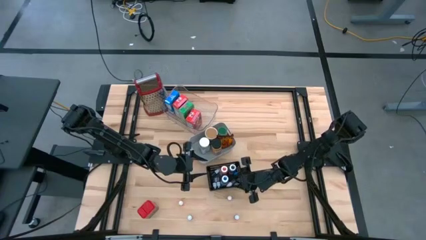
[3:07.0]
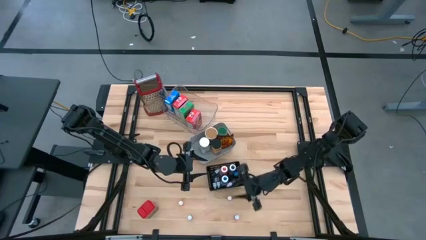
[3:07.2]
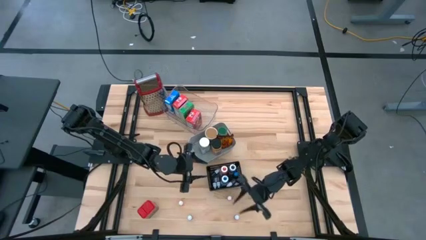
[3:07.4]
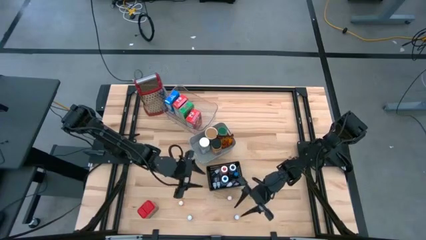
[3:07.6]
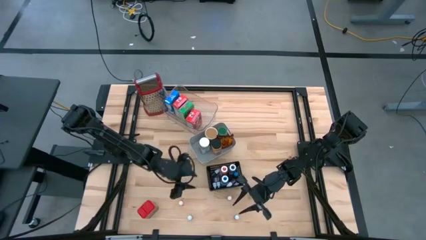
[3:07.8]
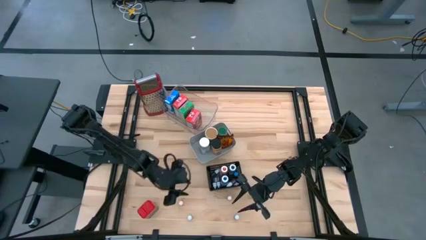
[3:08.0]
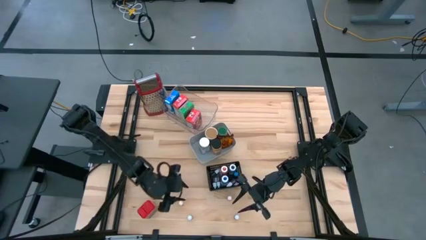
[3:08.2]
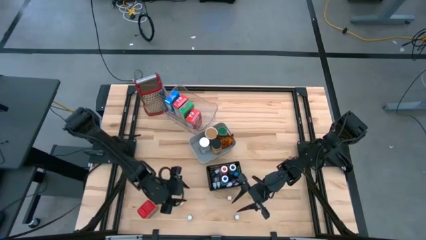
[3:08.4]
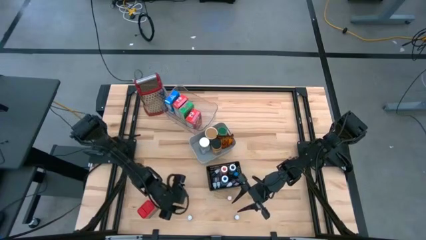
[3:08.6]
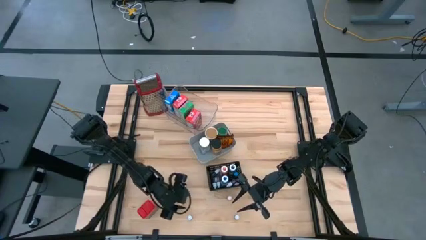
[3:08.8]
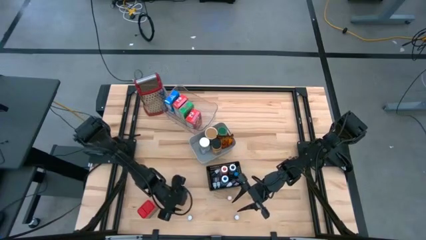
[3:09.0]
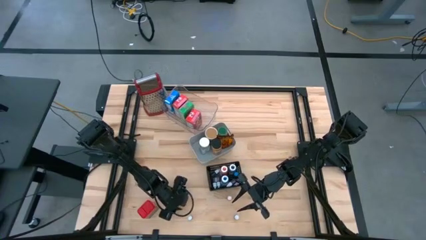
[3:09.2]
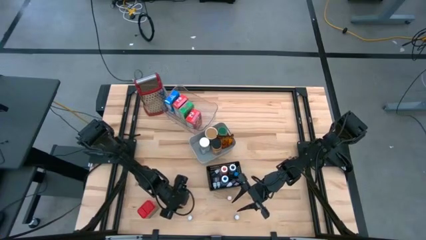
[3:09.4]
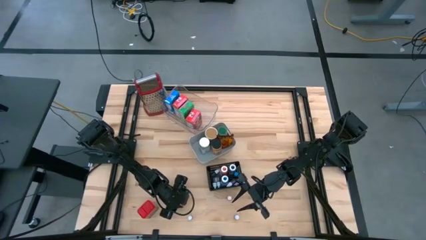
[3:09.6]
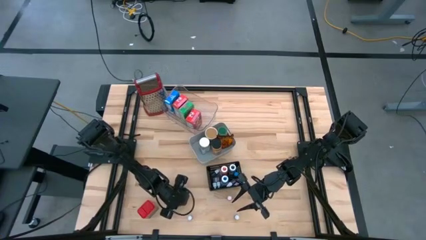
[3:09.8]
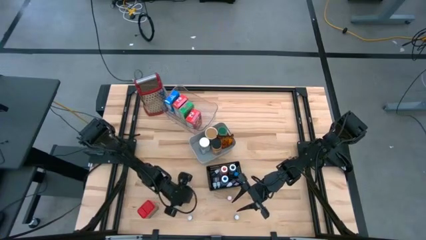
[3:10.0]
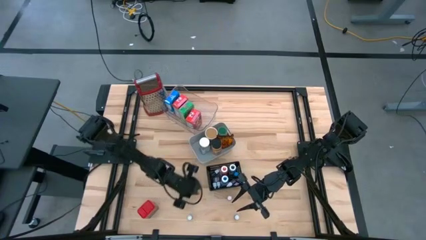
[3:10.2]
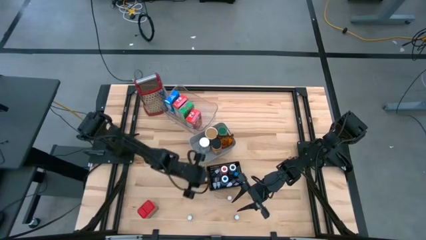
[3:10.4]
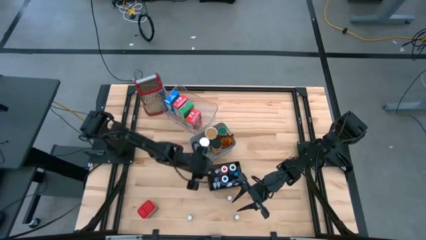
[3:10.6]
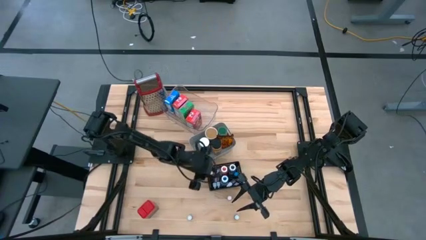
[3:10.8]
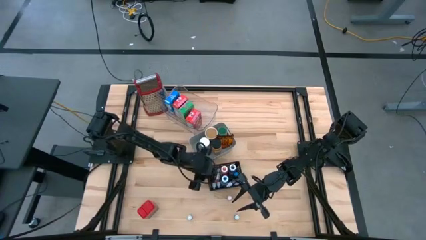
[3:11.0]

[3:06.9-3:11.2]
Task: Pick & Place Kitchen Items
Put the orange small food coloring bottle into the black bin

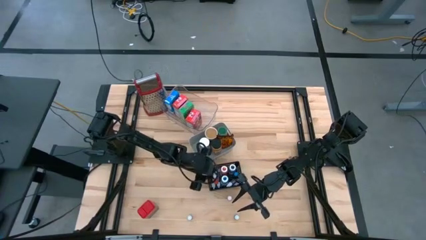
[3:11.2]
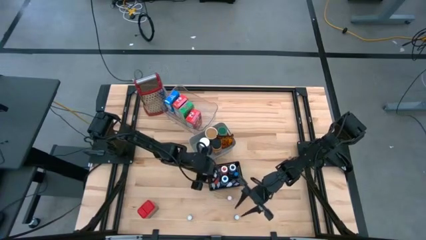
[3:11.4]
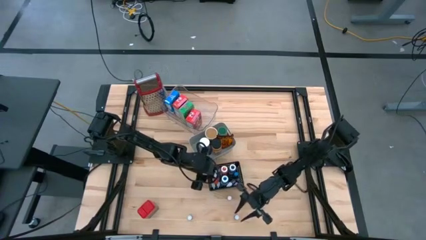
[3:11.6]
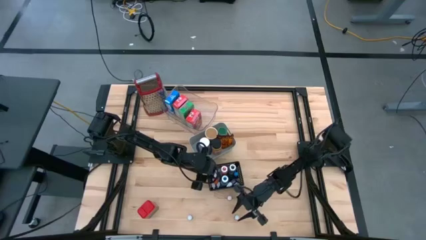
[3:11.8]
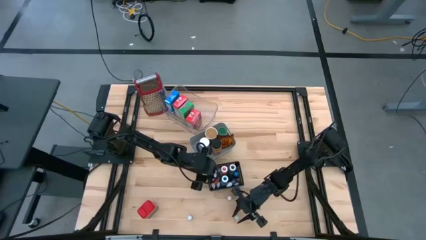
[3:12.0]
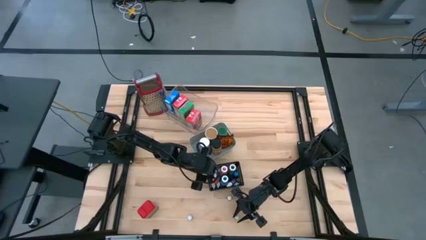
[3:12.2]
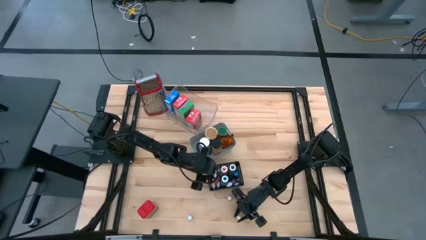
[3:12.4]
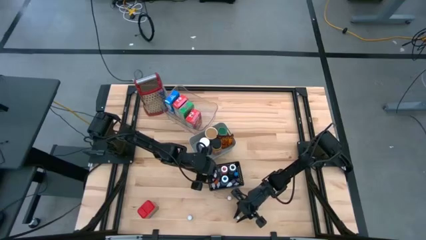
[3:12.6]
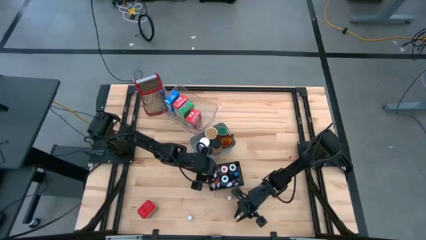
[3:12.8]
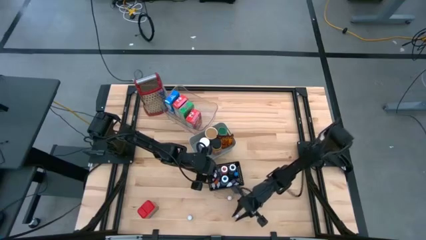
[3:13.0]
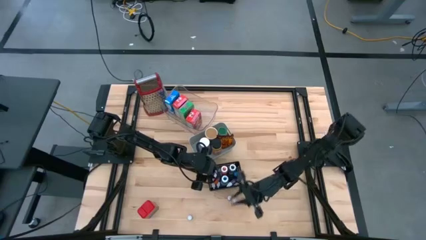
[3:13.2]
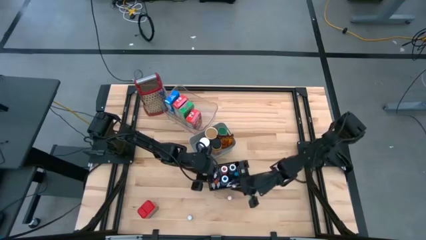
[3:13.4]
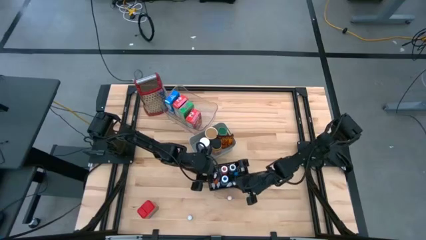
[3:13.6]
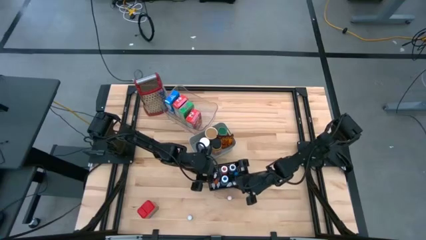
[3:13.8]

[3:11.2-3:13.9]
Put the black small food coloring bottle into the black bin

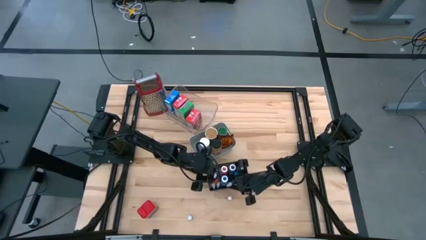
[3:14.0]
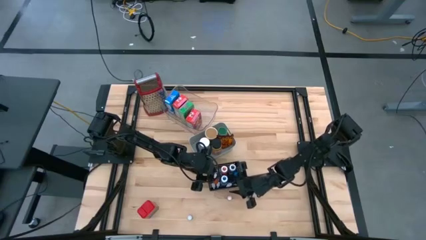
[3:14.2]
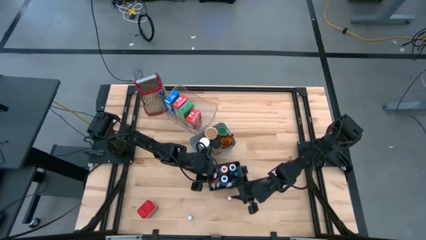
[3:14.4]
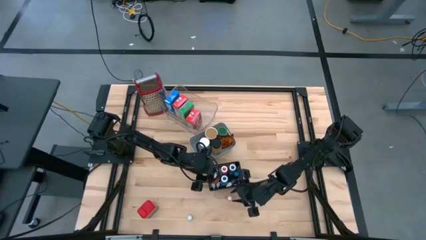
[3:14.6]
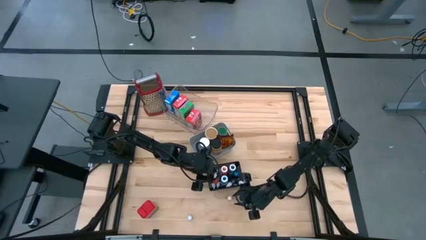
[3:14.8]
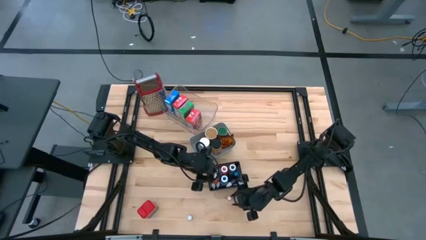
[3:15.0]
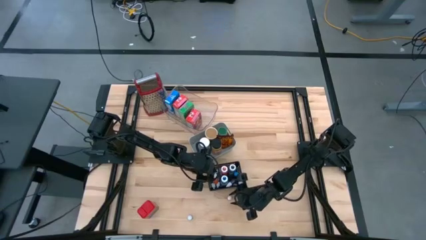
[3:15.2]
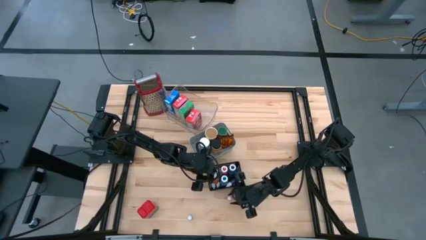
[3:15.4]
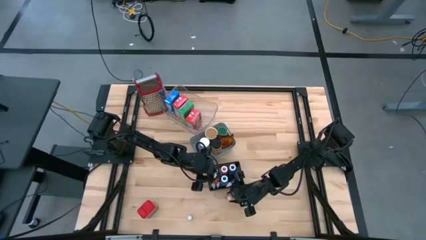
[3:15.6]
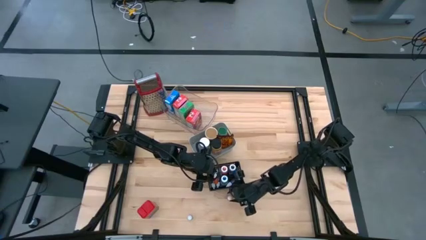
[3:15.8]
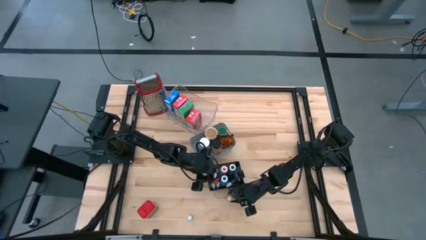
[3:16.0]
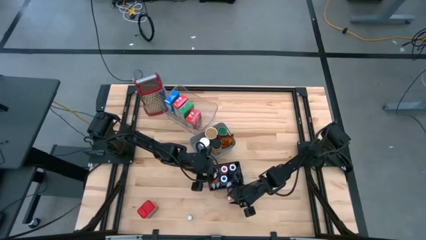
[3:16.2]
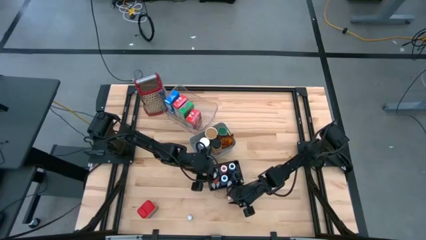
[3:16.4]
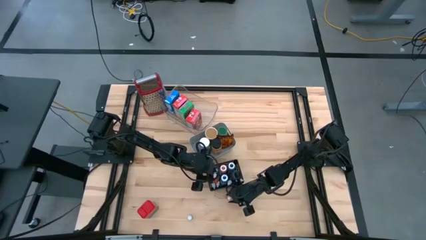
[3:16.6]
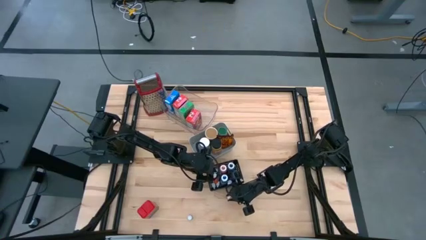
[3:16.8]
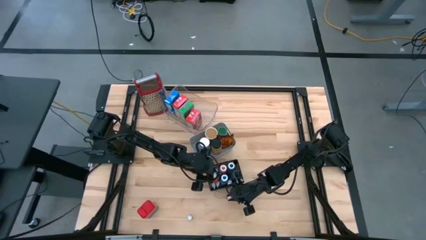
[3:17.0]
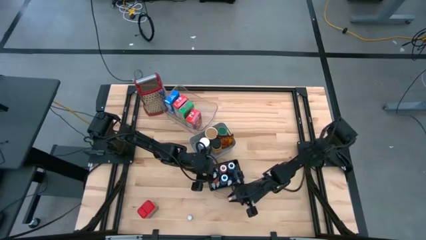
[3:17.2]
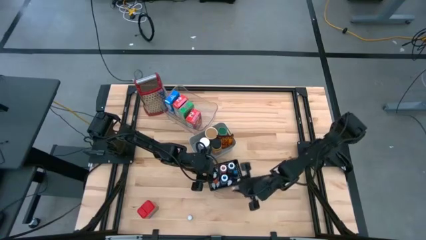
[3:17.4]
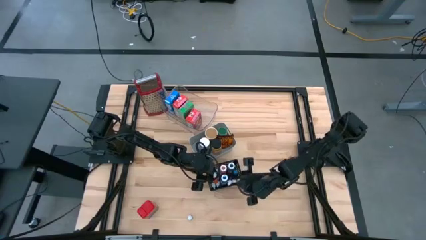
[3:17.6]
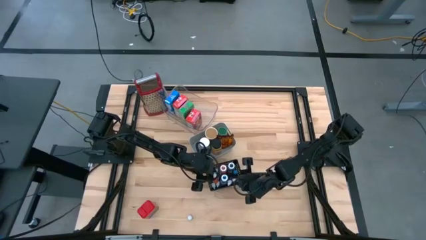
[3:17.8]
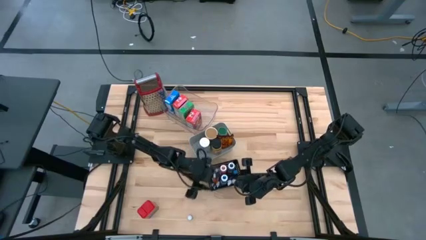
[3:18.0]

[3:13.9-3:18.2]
Put the orange small food coloring bottle into the black bin

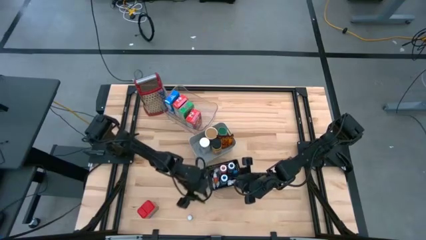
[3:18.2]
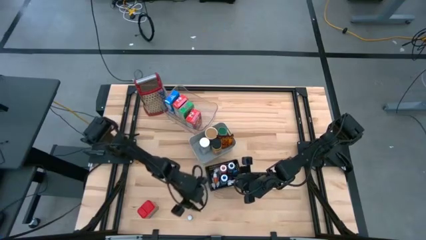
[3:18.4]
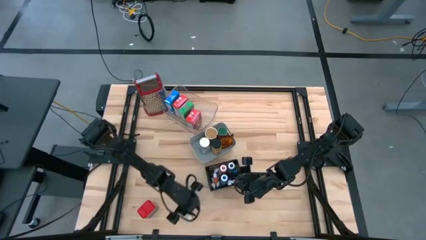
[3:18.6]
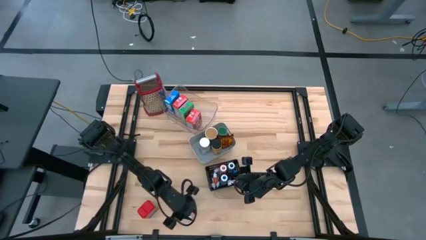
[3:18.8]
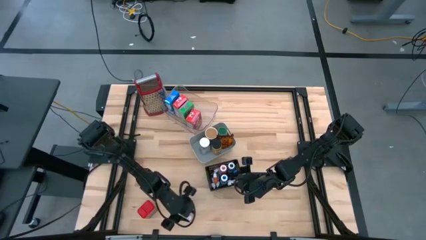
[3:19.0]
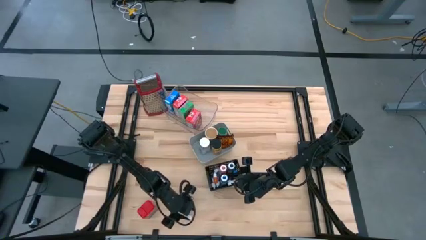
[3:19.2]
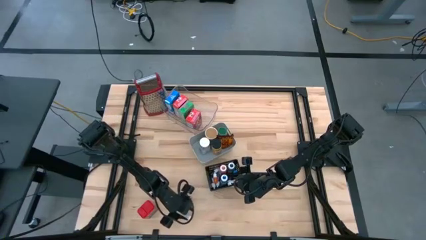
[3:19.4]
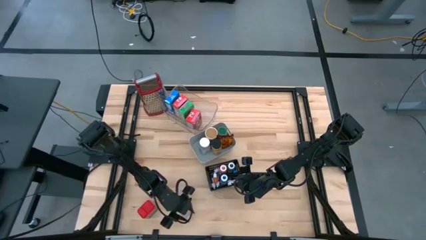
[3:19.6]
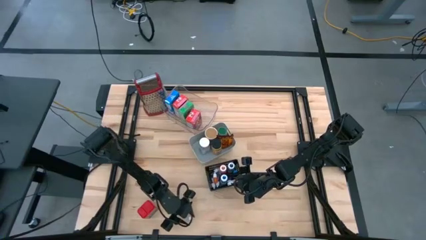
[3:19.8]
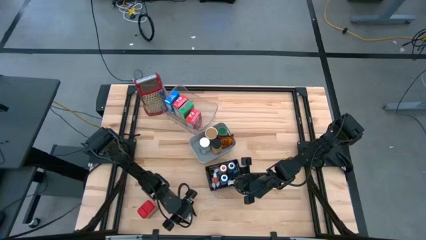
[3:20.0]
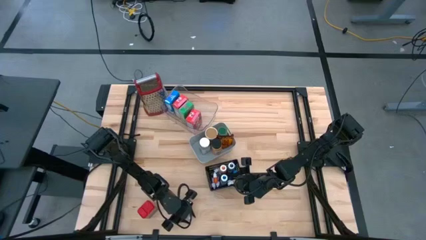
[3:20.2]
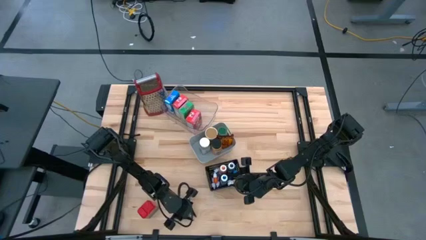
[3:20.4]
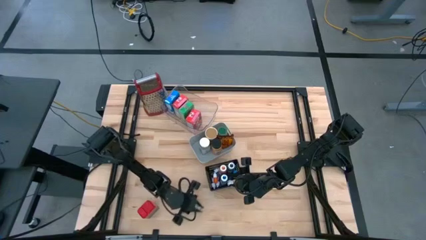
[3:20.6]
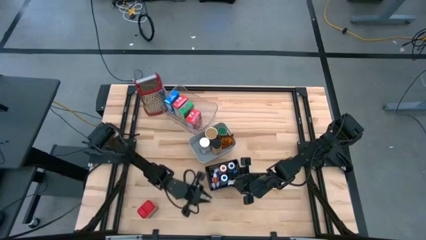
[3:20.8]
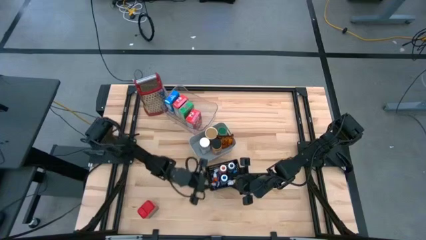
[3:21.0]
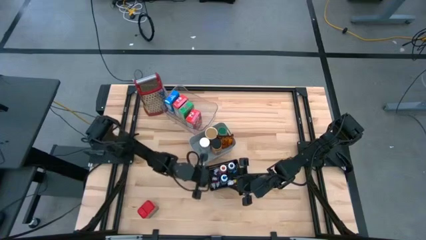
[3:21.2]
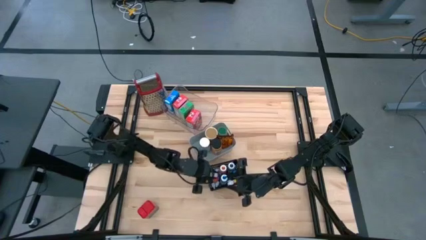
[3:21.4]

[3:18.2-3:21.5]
Put the green small food coloring bottle into the black bin

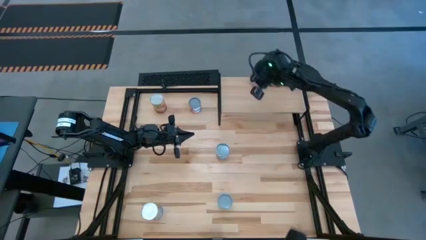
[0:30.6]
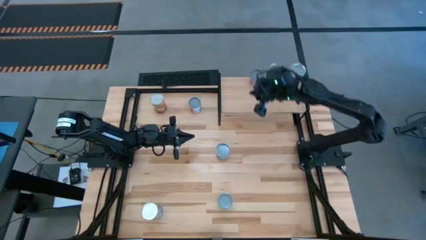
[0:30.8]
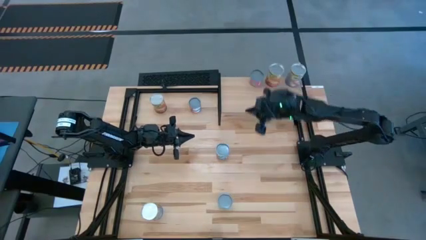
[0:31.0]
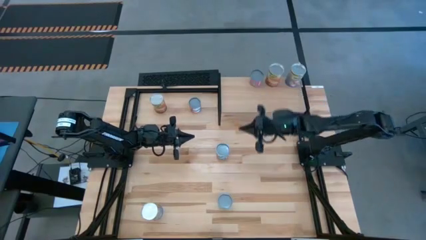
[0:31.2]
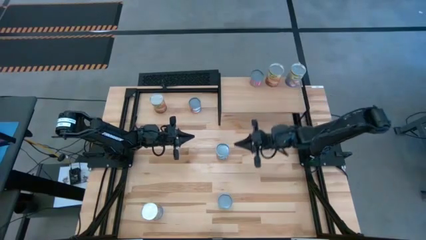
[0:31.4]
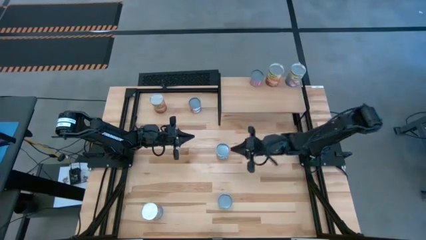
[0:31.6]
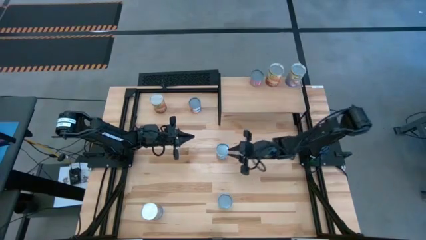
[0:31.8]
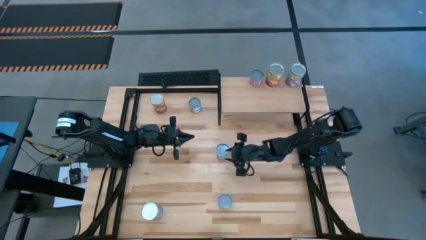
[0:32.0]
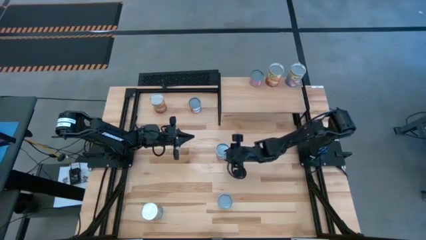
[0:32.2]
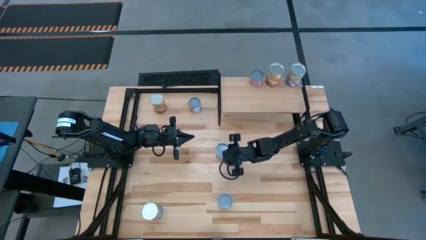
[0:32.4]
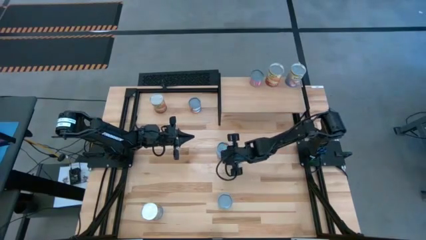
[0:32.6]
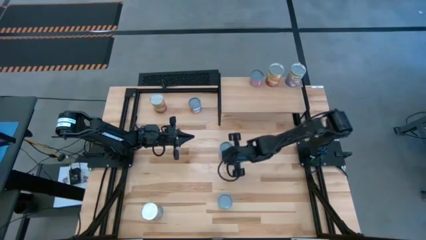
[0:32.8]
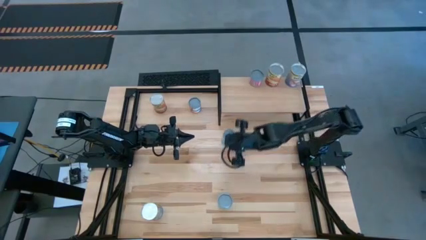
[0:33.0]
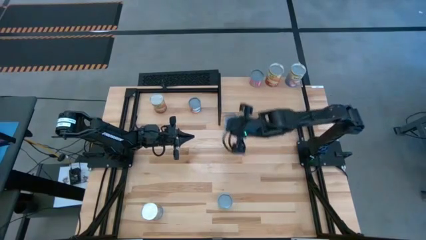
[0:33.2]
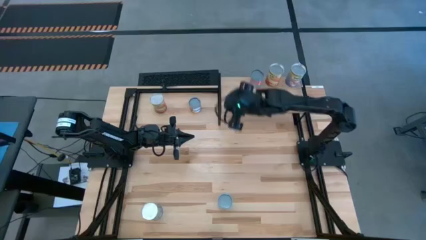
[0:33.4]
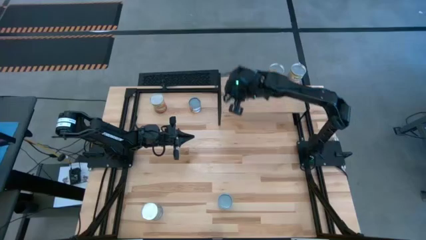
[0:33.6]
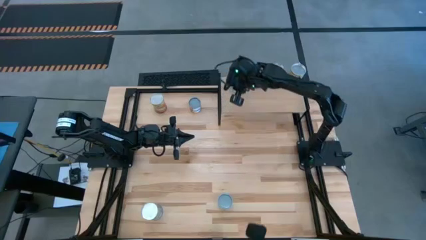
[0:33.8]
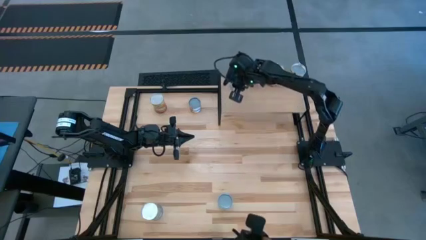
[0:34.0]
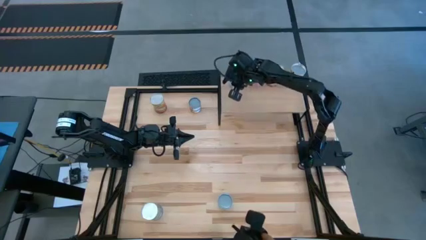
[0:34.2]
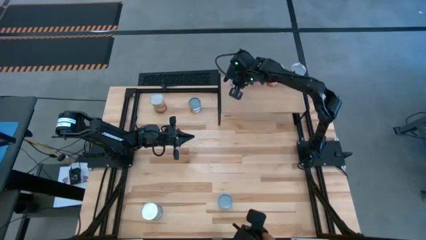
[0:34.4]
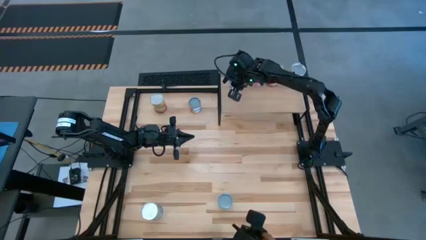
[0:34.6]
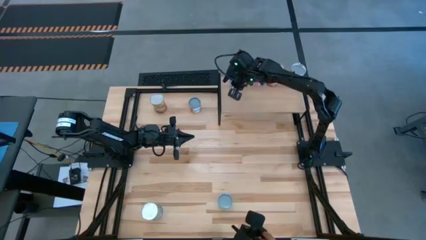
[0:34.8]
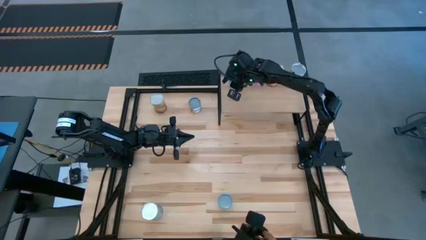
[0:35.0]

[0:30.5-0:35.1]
Task: Pick and place cans onto a shelf
Put the canned carrots on the shelf
